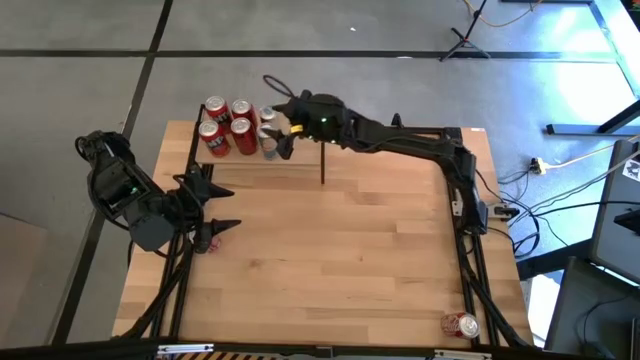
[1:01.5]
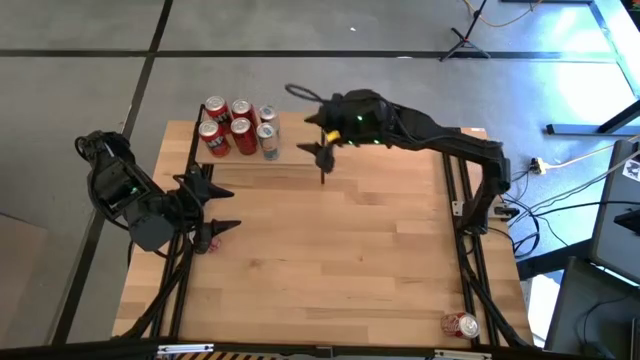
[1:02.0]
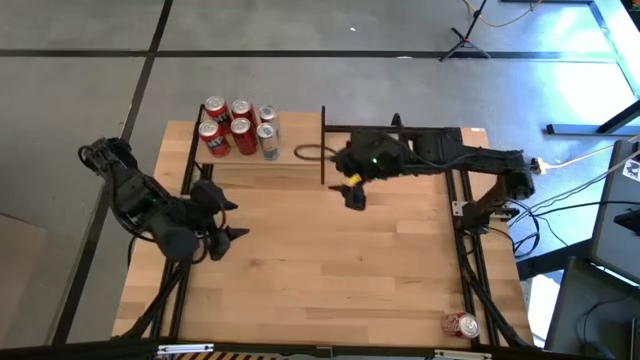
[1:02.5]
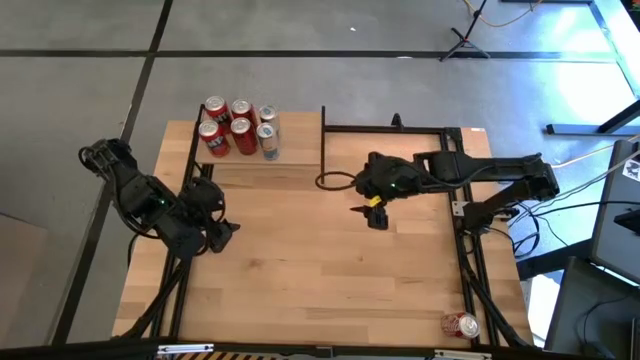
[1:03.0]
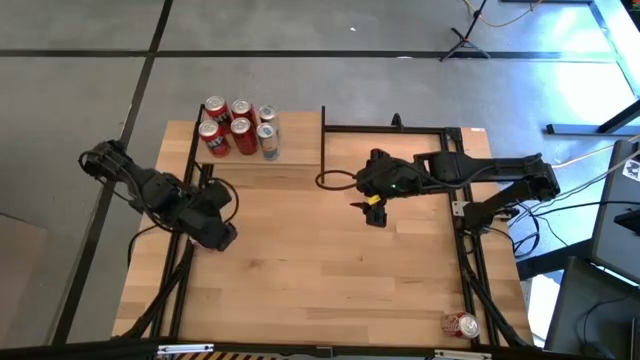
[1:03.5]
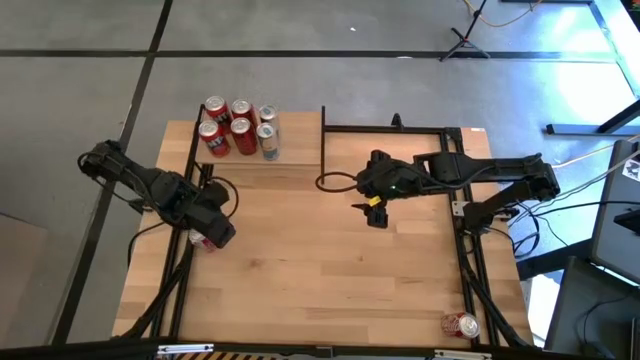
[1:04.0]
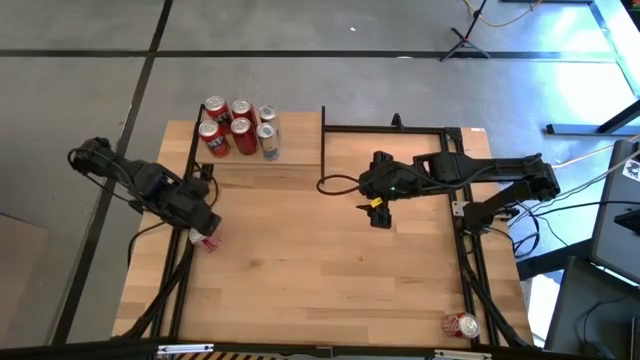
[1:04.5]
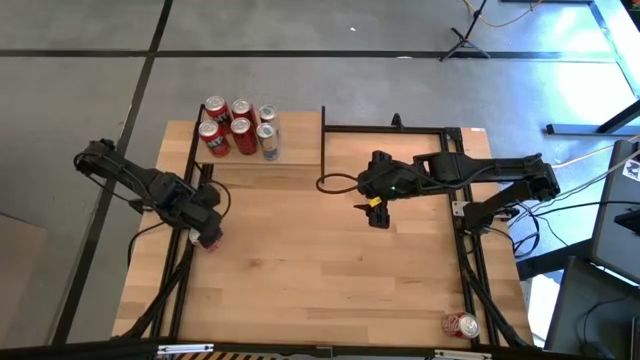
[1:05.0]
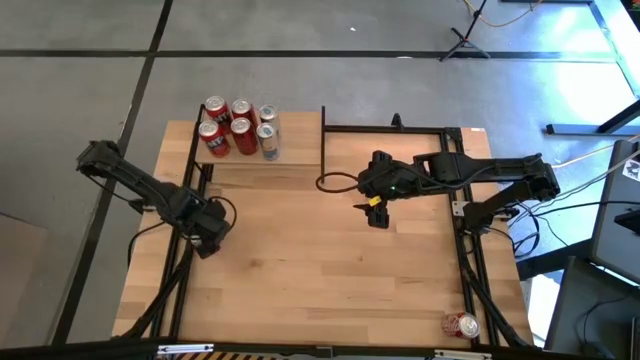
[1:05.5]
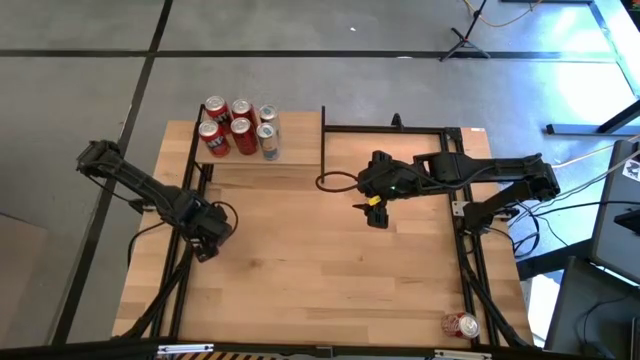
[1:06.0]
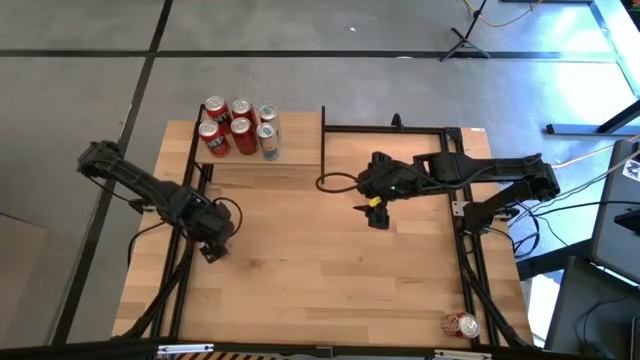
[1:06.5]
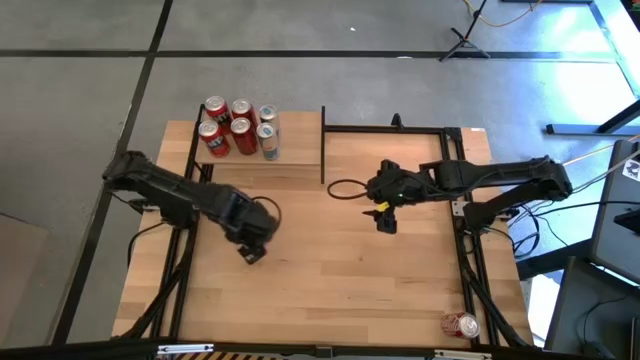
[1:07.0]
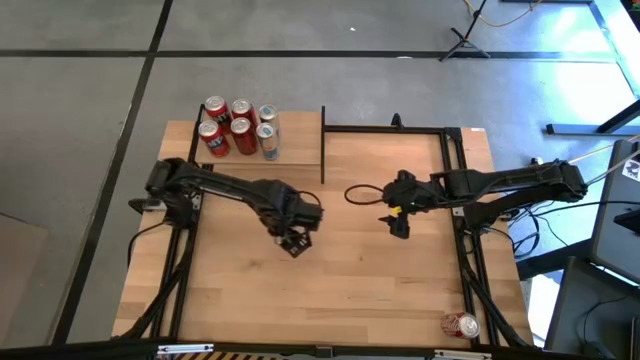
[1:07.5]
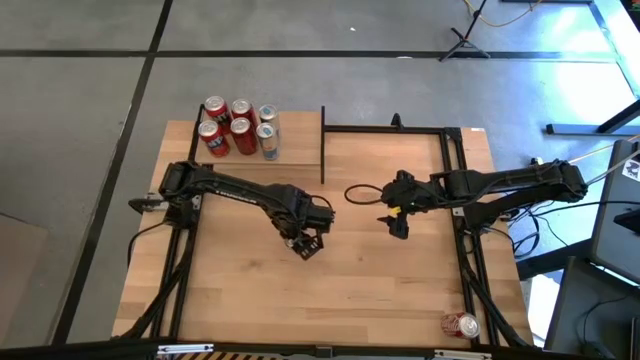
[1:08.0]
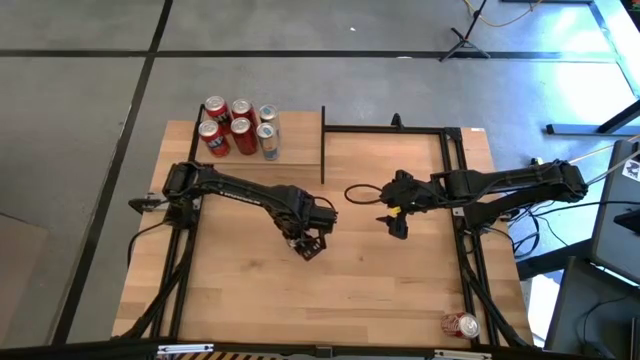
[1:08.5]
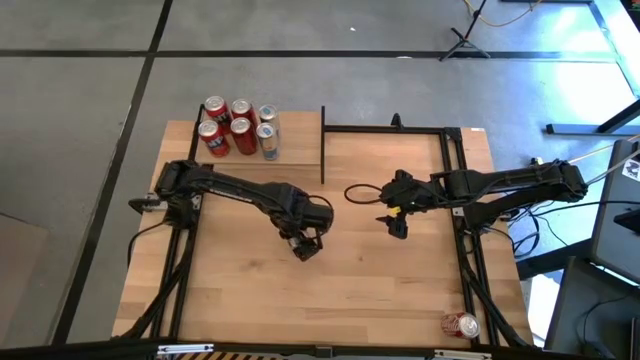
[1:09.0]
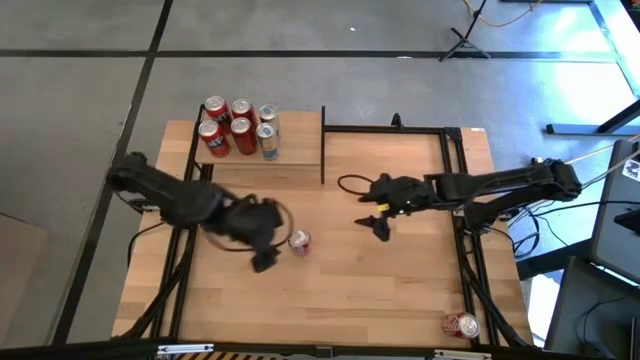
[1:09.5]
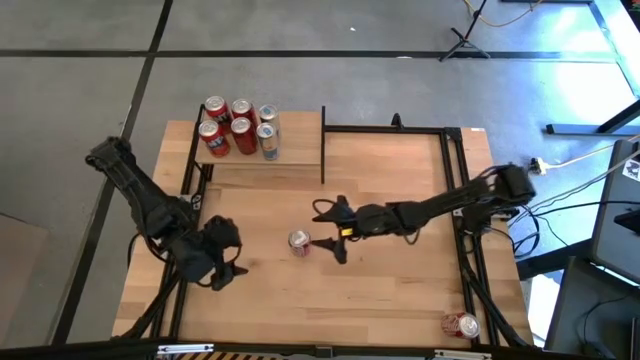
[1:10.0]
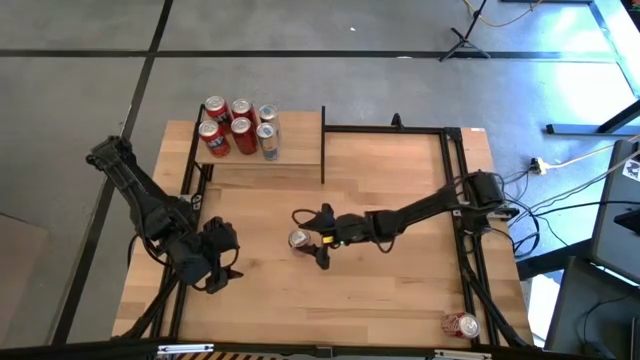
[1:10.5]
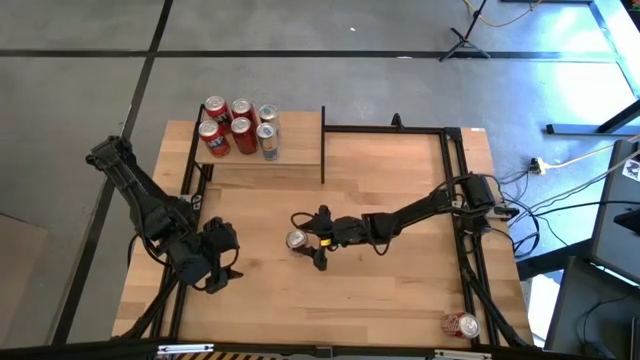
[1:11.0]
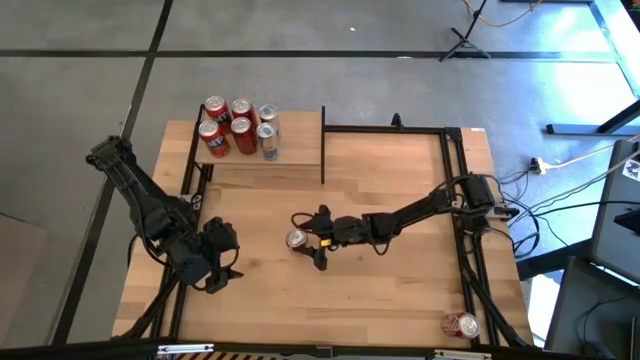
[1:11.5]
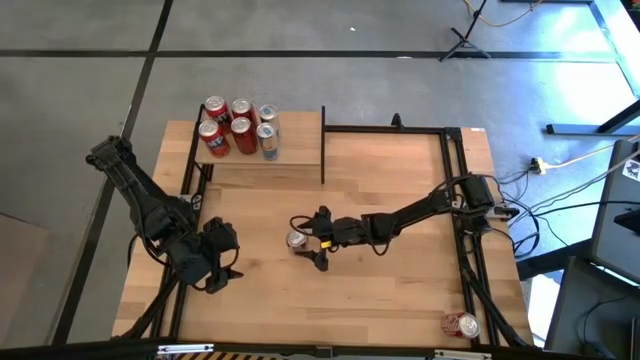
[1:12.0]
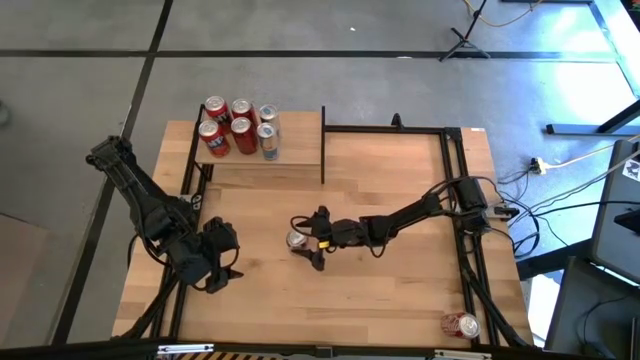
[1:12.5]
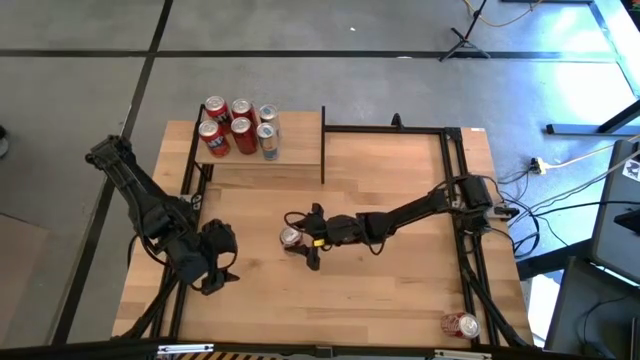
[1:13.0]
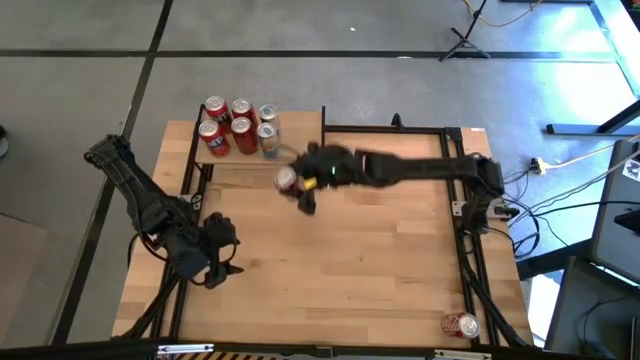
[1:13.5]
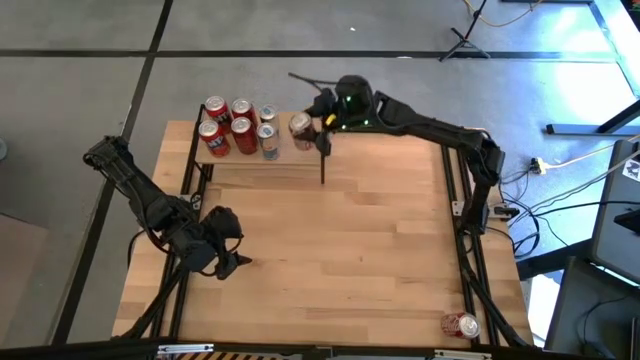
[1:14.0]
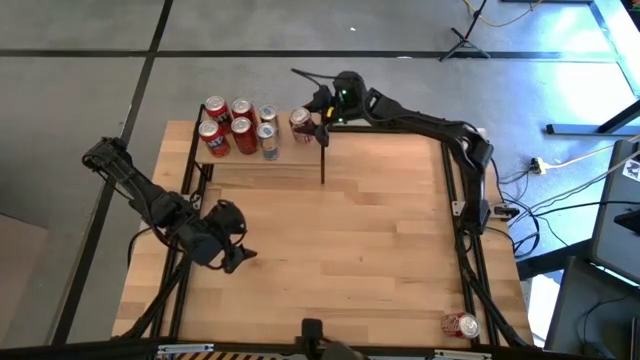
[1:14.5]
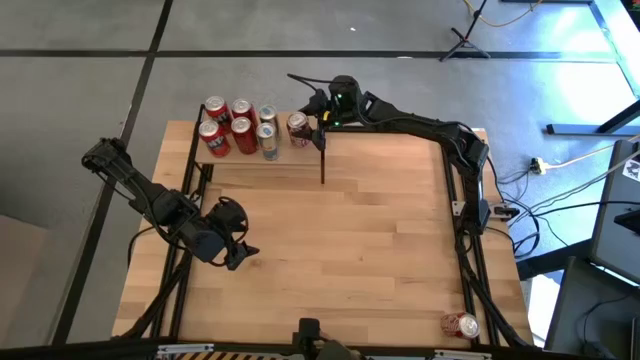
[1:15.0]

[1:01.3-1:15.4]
Task: Place canned beverage on shelf
Put the left red white soda can on the shelf

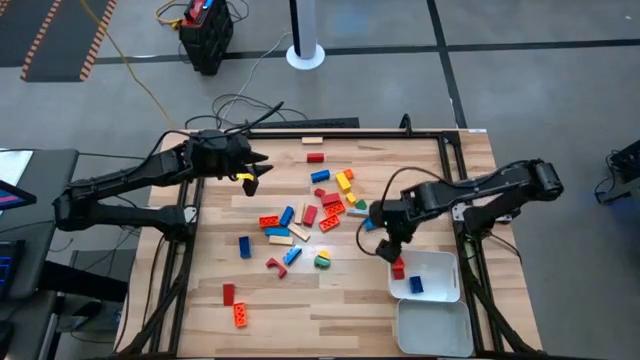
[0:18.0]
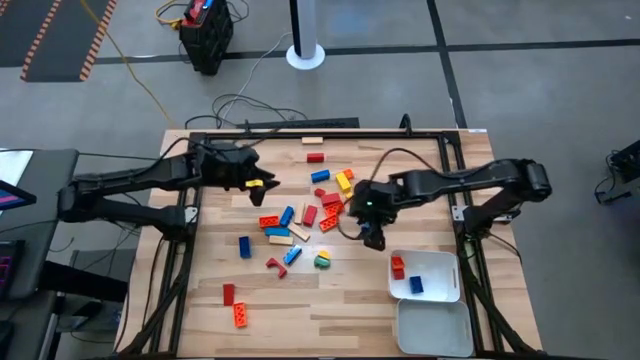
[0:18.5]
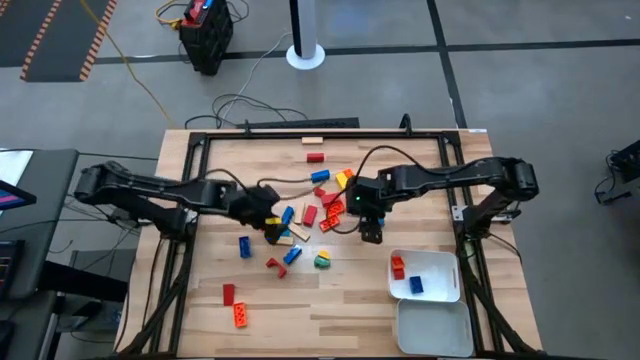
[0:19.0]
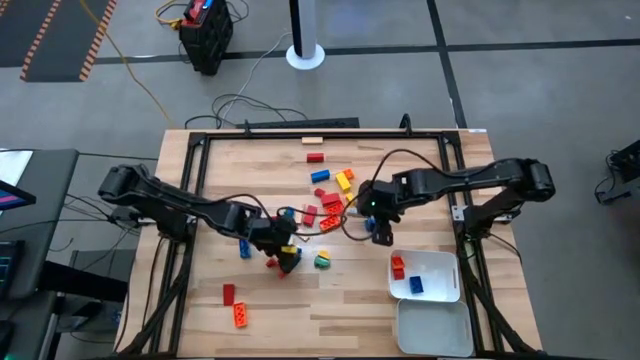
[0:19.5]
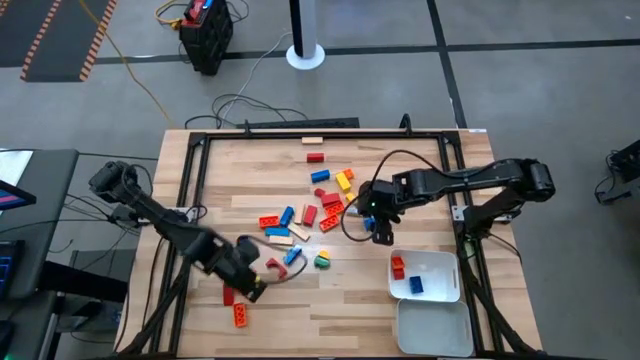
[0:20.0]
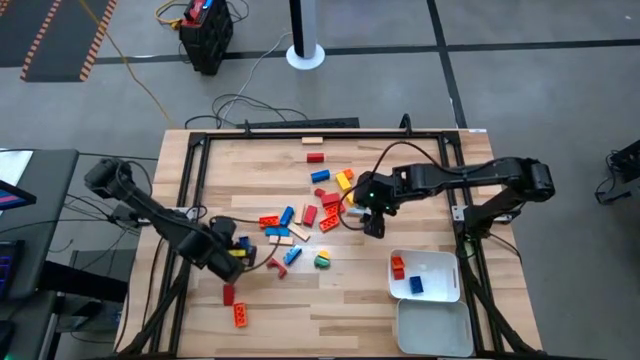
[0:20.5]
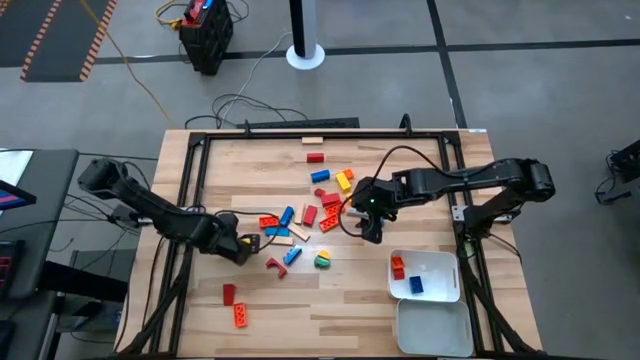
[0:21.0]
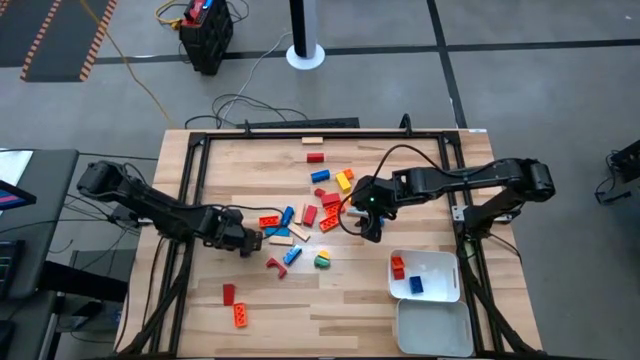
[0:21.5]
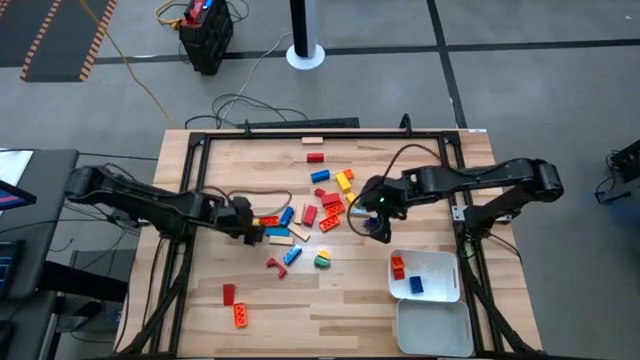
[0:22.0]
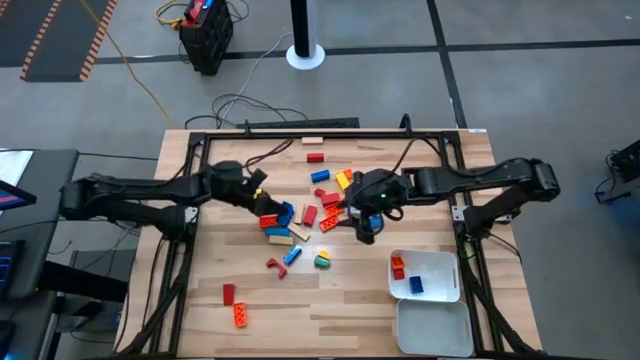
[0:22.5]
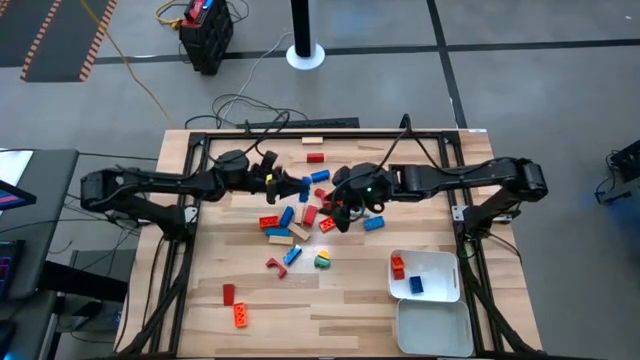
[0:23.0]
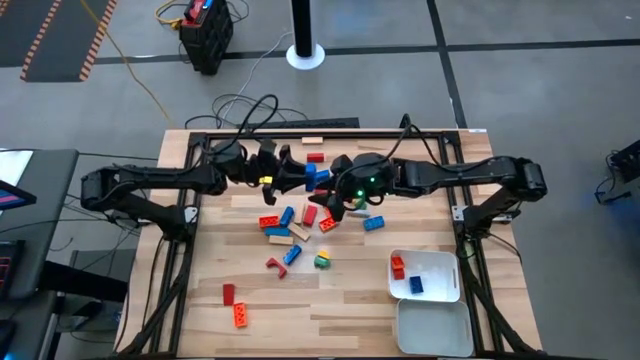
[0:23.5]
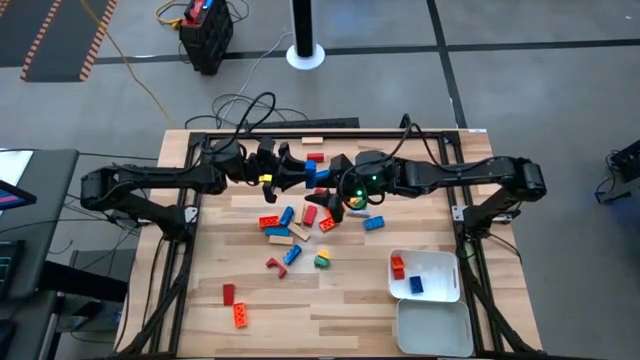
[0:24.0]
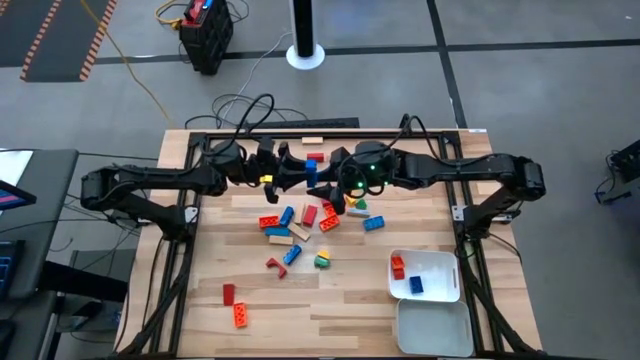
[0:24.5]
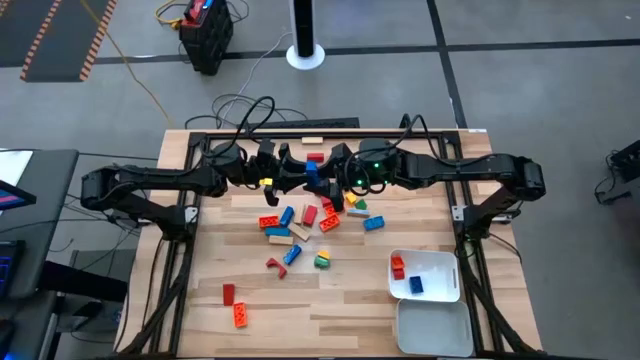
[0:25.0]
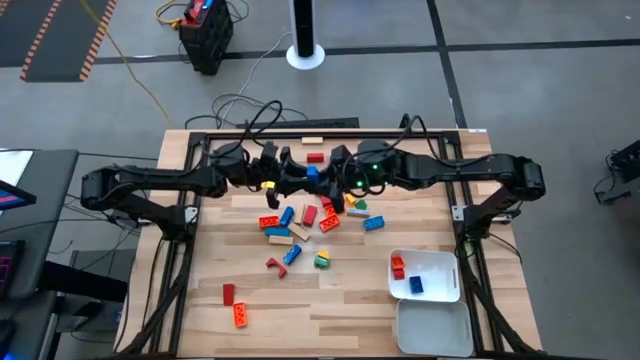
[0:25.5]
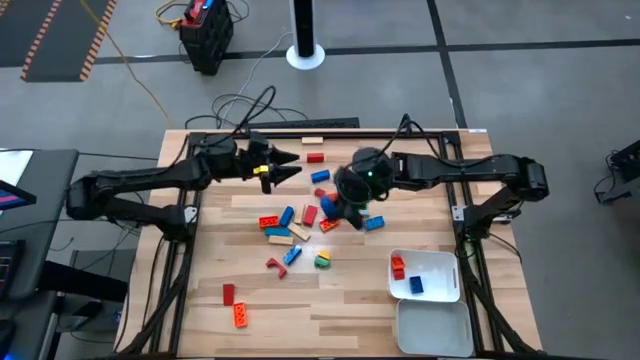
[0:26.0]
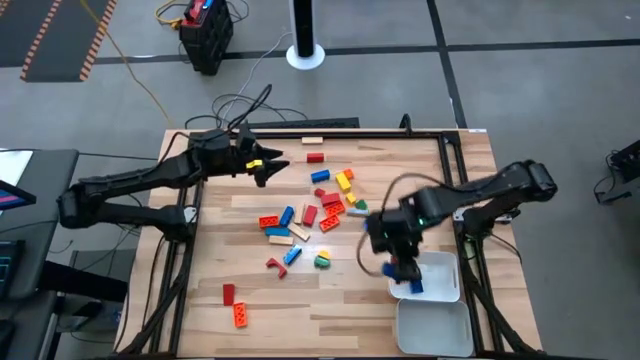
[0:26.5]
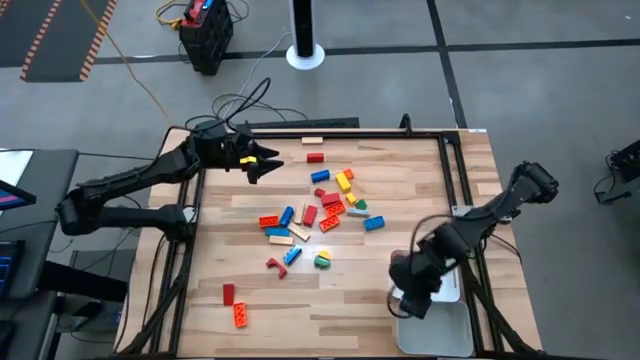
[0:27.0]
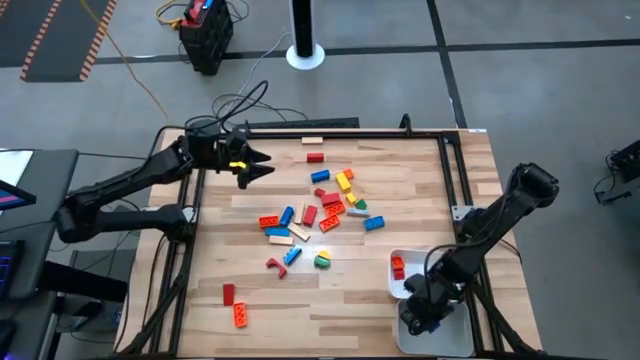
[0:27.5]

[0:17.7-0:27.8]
Task: Sort blocks by size
Put the big blue game piece into the gray bin
